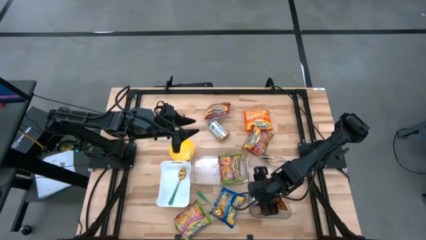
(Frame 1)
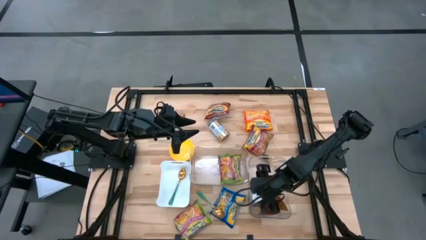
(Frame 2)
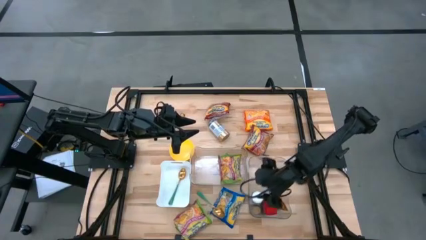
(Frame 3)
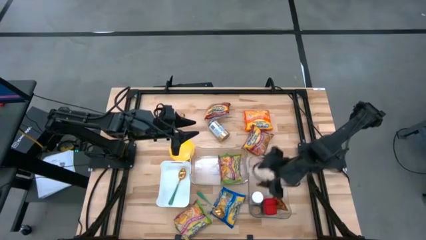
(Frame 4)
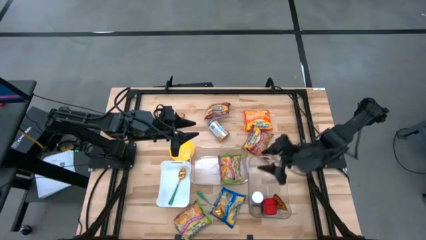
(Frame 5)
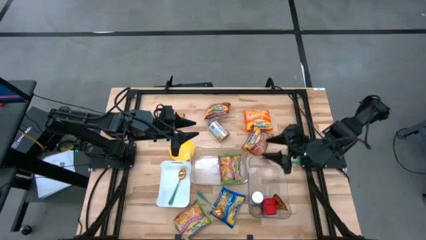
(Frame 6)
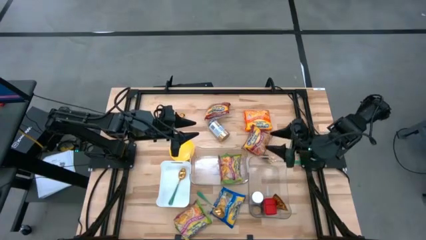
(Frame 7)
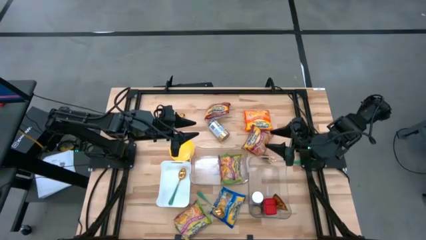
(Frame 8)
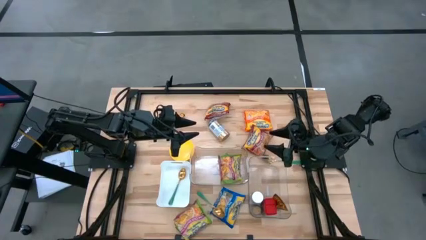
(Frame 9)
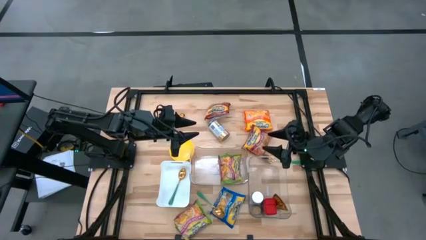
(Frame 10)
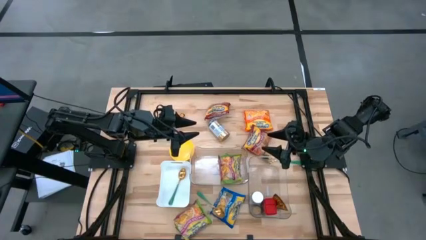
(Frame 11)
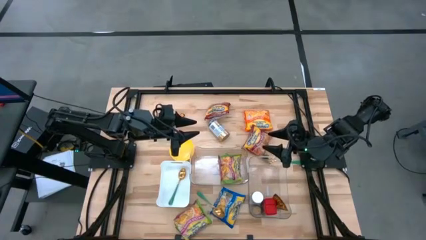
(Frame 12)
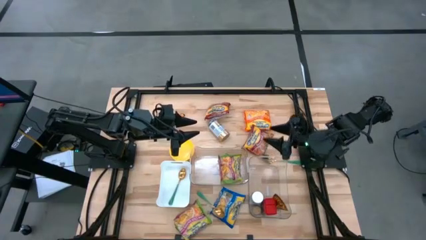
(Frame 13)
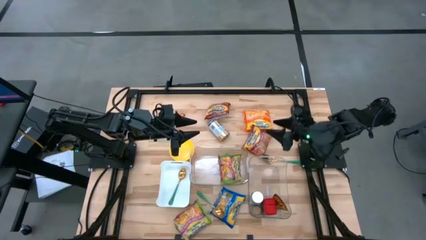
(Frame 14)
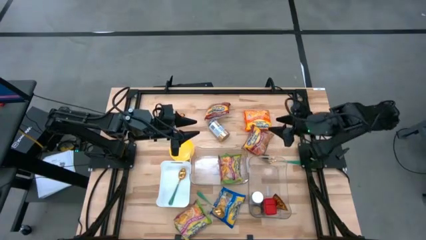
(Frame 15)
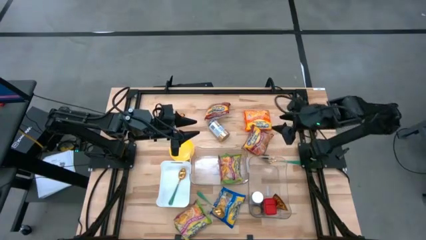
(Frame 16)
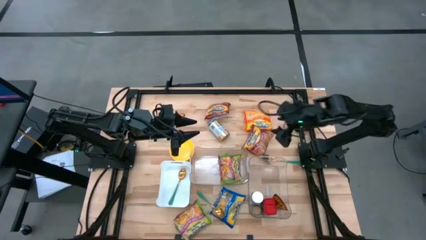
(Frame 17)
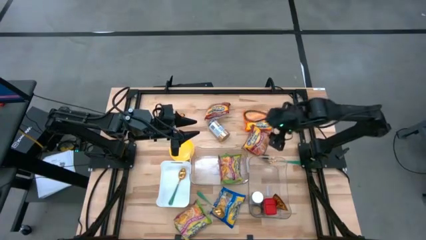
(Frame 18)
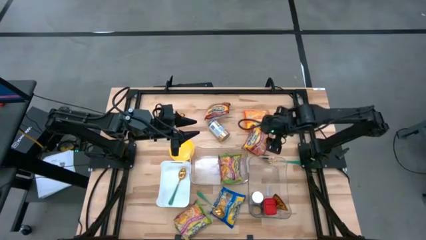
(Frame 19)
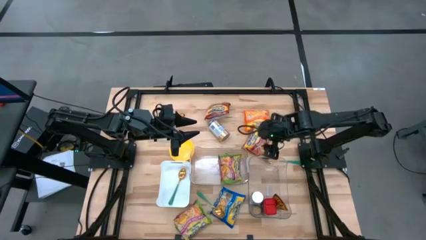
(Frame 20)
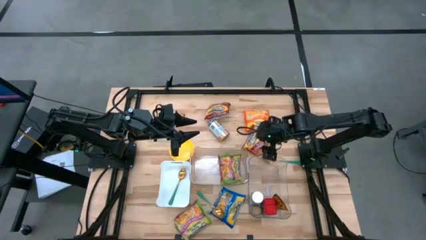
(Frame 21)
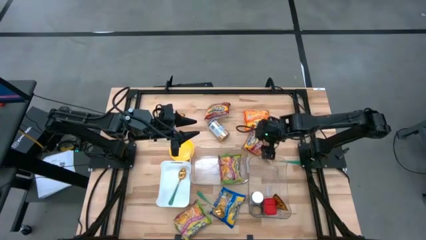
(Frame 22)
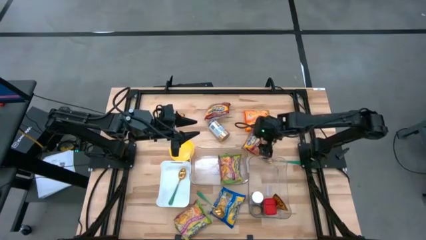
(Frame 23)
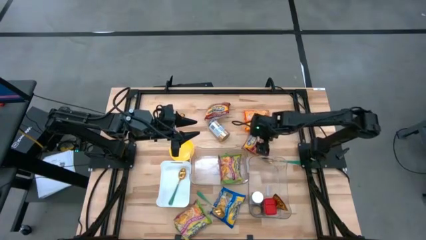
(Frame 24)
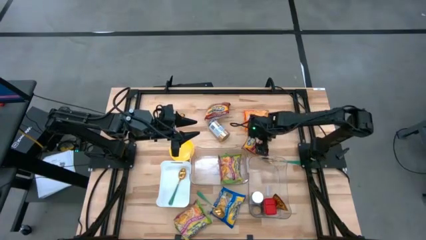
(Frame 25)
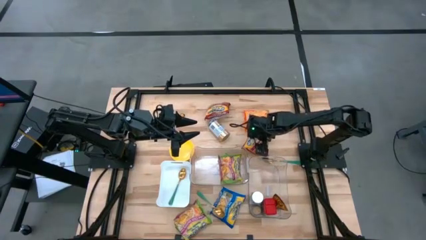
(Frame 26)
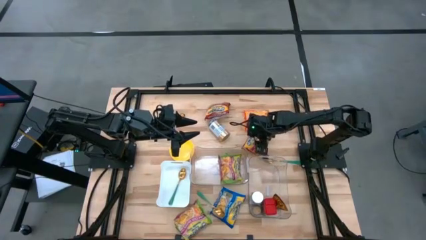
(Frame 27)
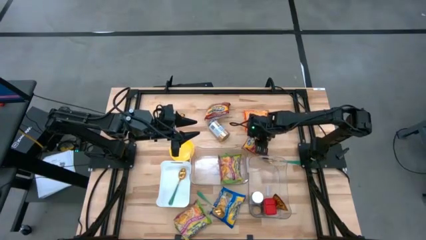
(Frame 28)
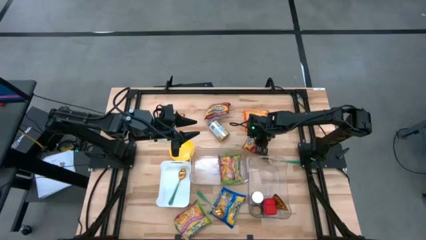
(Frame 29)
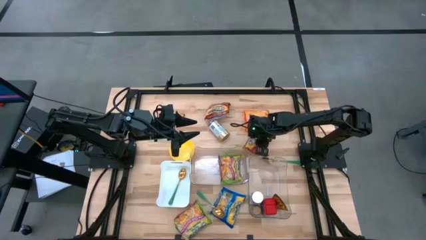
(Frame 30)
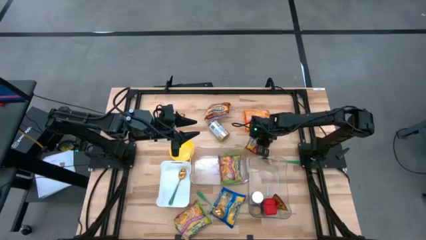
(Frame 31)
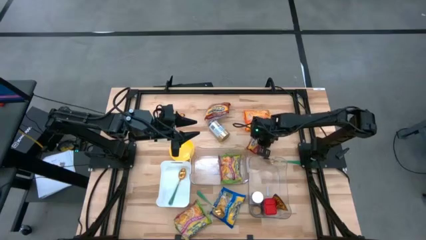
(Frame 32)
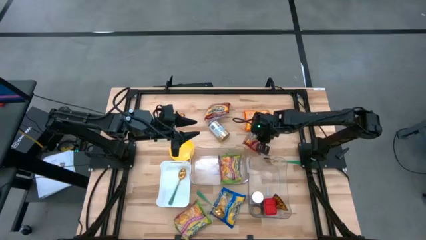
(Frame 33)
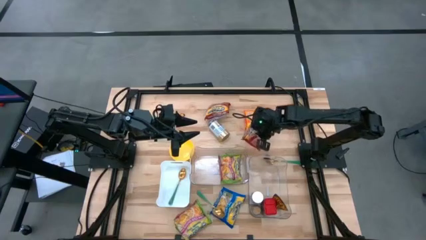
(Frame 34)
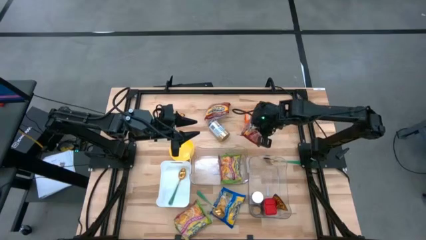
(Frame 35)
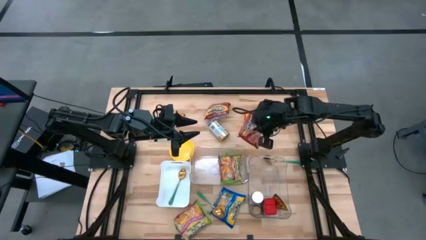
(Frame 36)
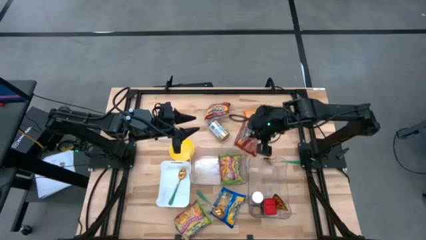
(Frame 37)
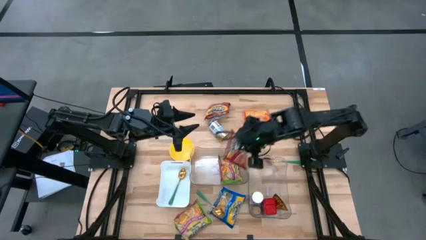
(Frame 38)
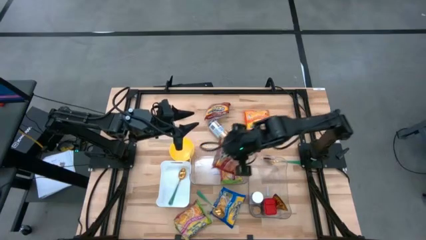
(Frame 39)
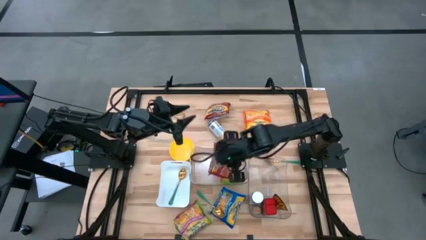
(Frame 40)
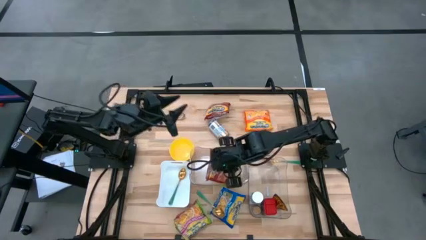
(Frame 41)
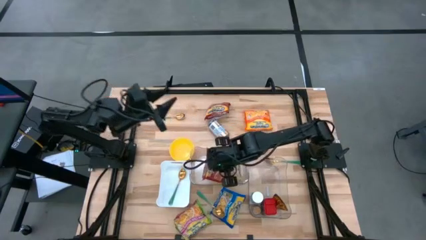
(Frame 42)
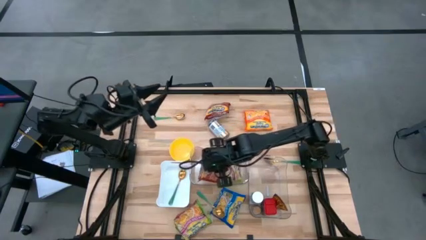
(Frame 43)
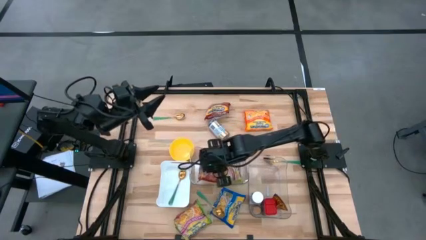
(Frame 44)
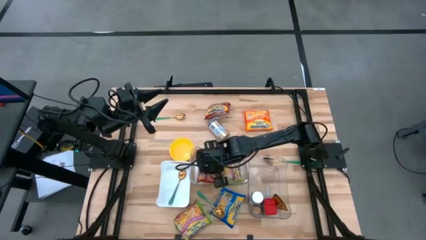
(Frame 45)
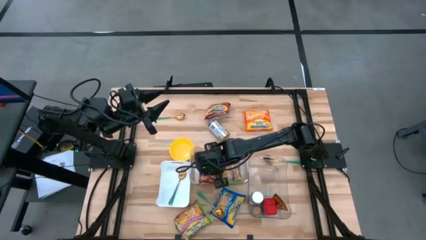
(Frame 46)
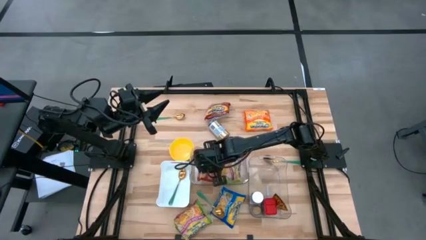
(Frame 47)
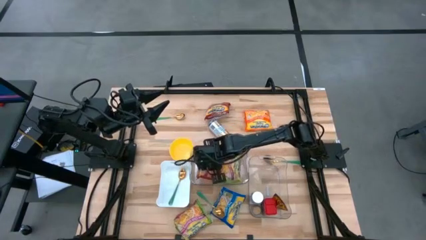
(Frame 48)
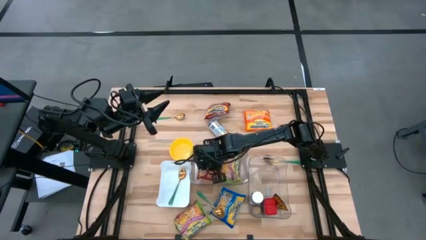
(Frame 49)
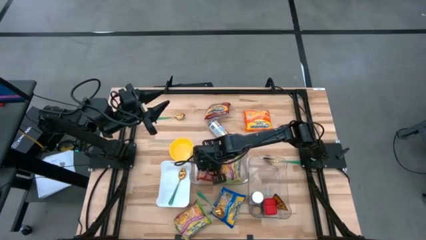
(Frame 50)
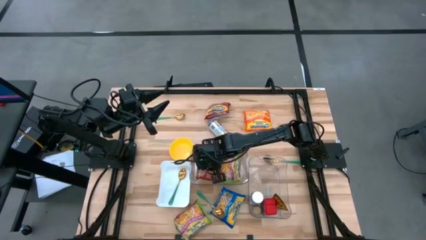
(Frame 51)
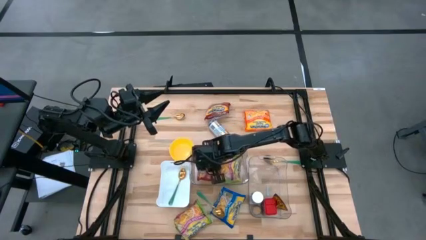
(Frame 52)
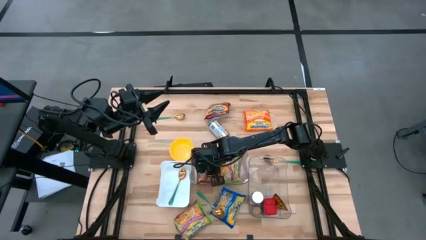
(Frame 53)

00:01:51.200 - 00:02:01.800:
Task: Pick & Place Food Item
Put the red noodle pack into the left transparent bin

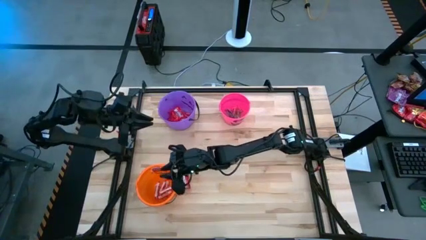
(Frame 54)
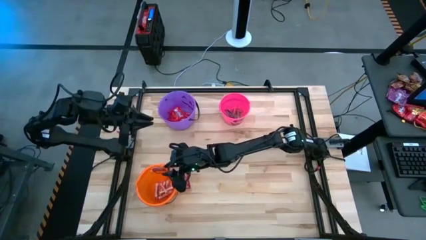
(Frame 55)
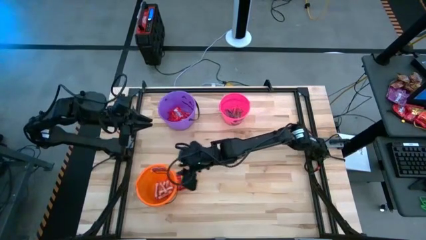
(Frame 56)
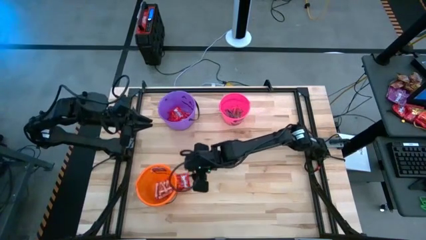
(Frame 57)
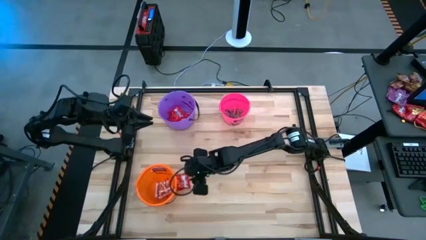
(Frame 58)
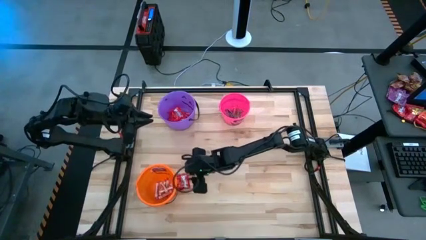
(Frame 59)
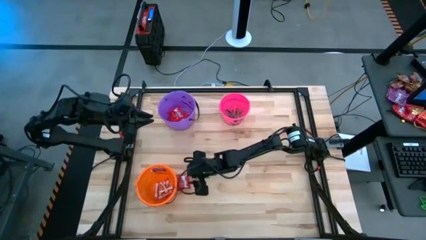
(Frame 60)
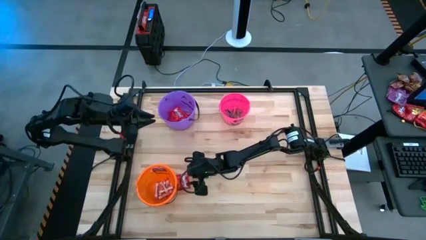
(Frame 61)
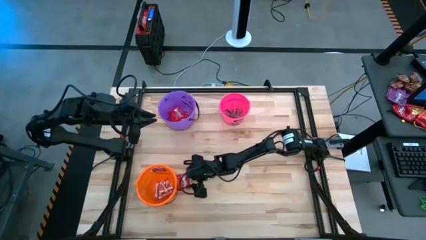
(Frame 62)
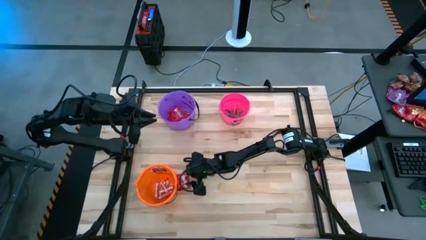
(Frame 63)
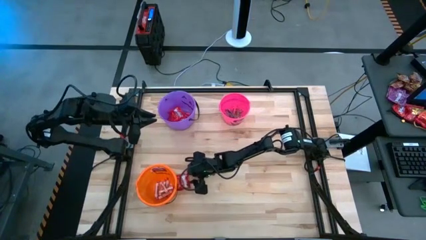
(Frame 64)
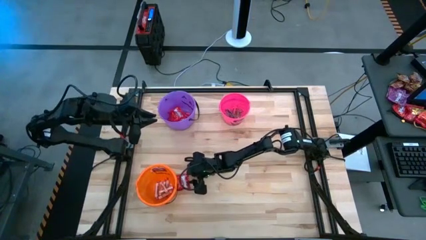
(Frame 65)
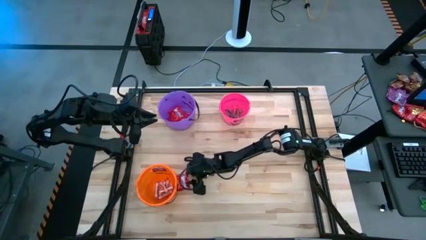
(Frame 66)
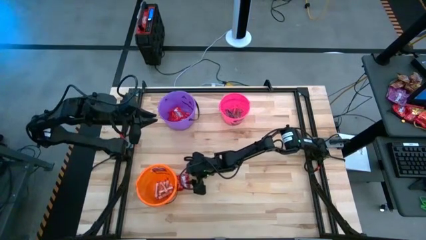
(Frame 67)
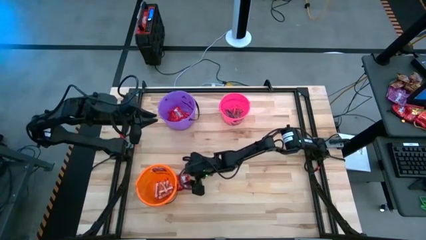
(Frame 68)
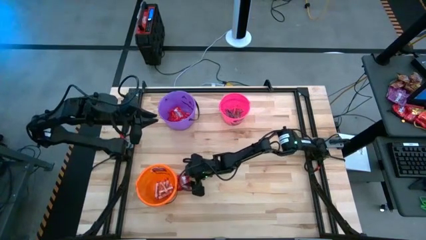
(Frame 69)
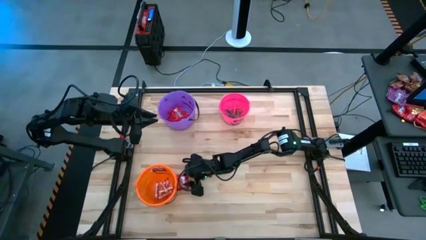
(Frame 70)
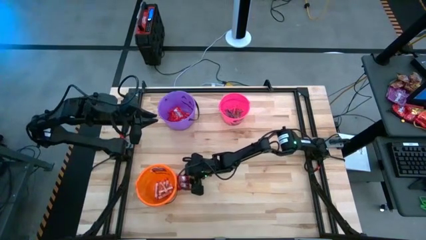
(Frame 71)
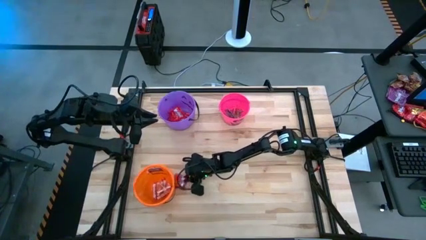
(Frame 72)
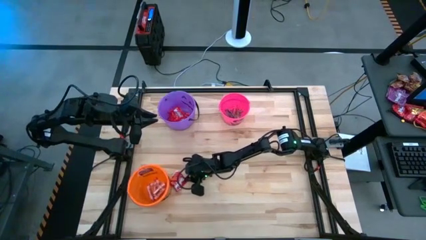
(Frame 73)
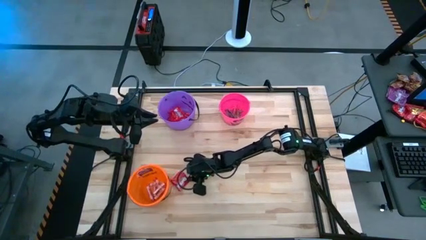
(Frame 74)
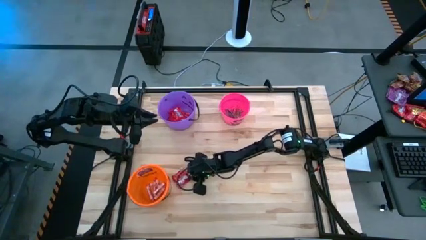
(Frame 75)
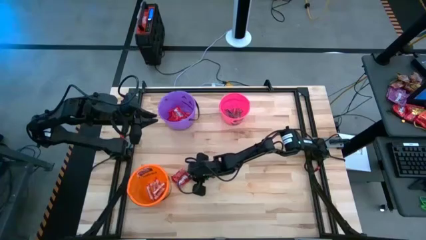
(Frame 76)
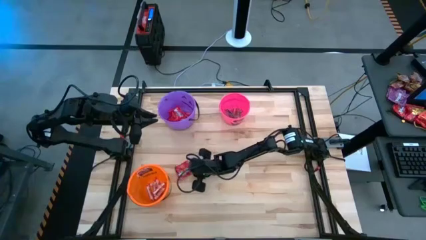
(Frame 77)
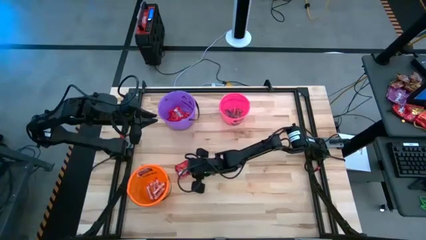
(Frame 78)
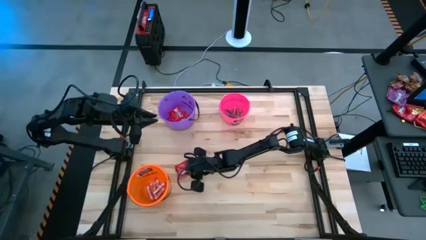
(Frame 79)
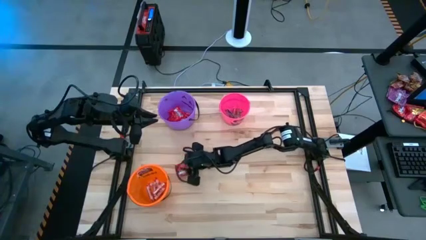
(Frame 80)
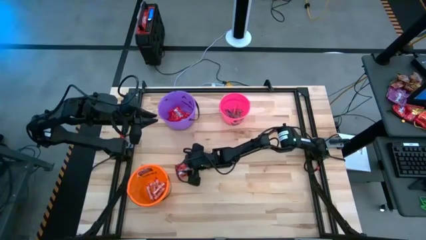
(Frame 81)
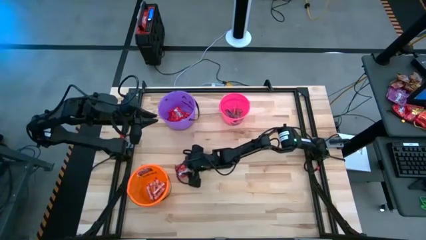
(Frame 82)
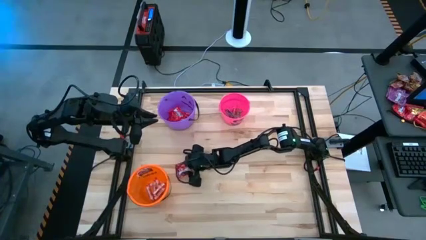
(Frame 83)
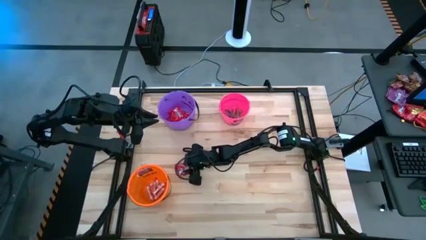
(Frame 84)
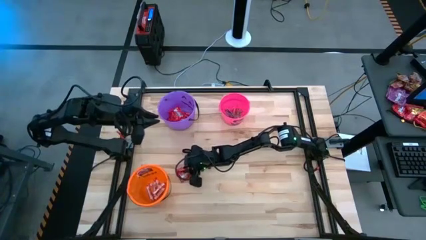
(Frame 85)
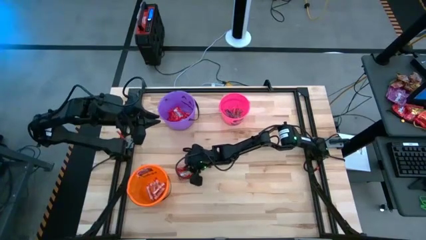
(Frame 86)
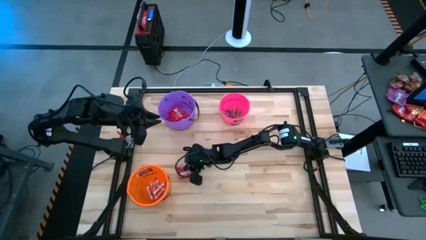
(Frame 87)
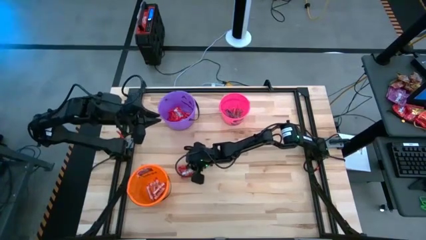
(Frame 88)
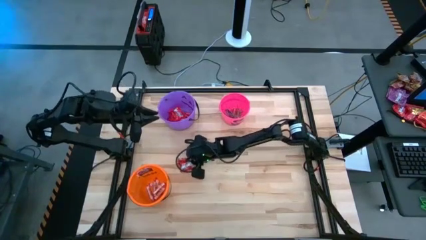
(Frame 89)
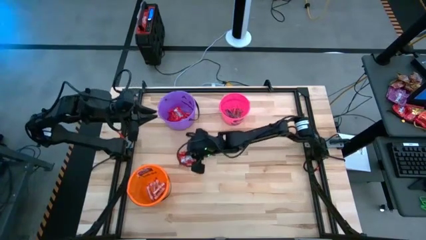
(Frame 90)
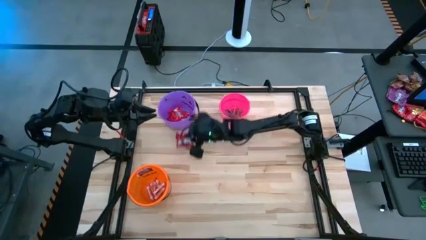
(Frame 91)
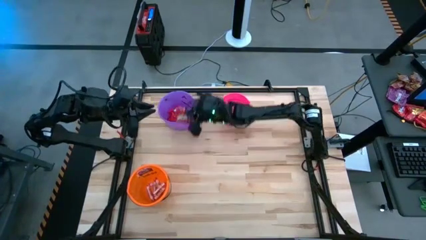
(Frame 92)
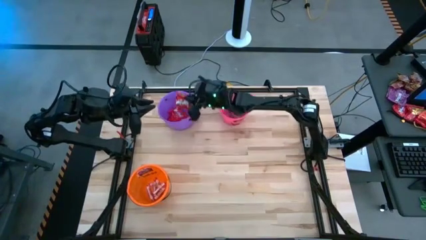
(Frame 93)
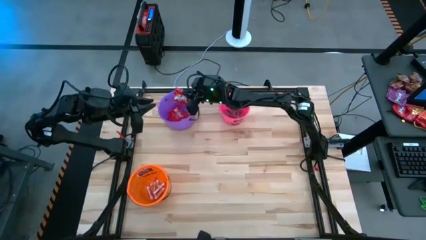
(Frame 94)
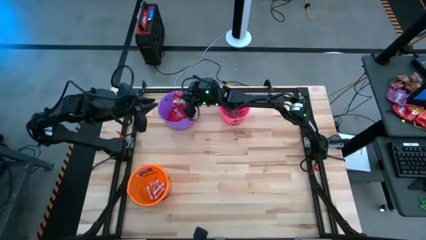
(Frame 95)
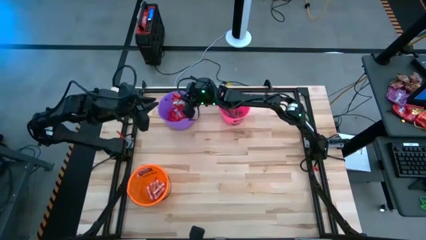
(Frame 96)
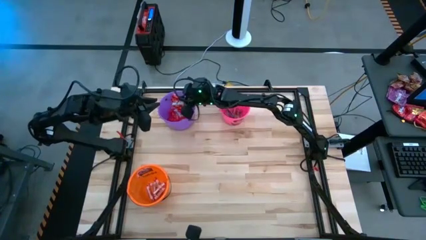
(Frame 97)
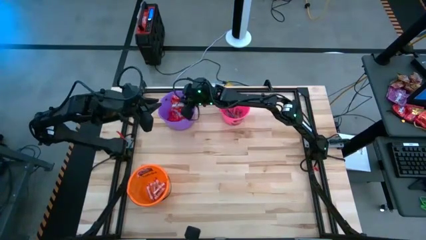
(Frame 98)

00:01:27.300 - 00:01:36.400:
Task: Sort candy by brand, put in halloween buckets
Put the red candy into the purple bucket
